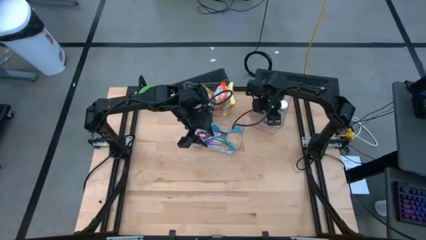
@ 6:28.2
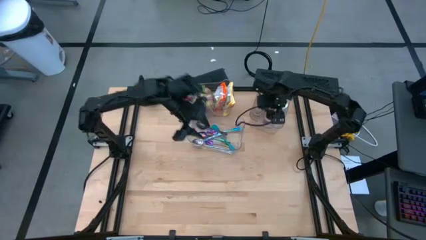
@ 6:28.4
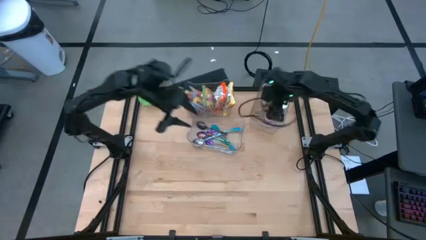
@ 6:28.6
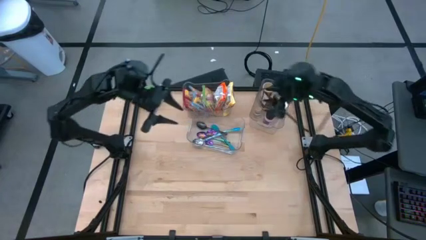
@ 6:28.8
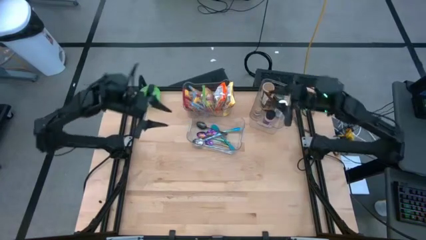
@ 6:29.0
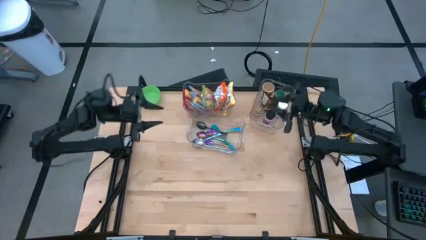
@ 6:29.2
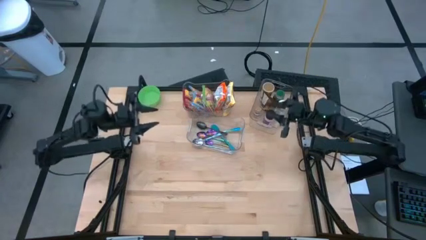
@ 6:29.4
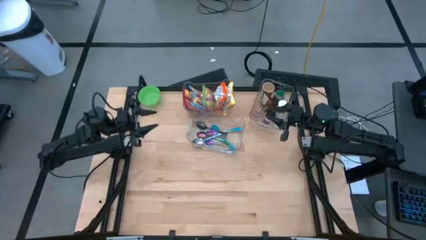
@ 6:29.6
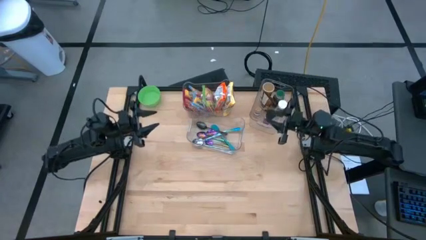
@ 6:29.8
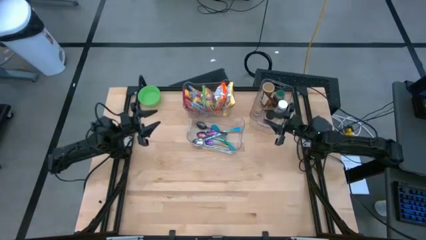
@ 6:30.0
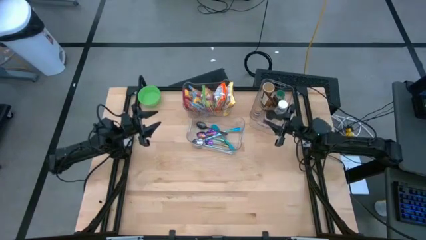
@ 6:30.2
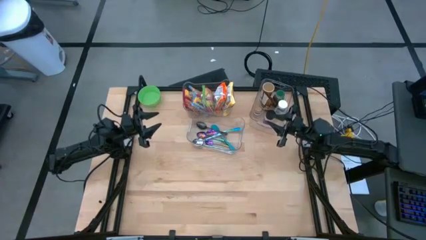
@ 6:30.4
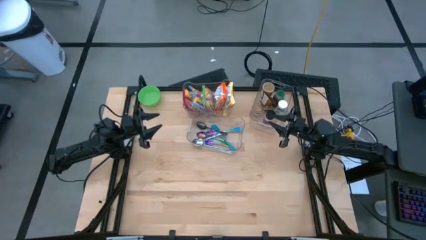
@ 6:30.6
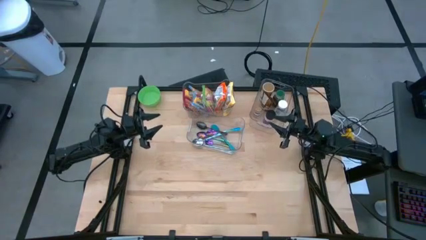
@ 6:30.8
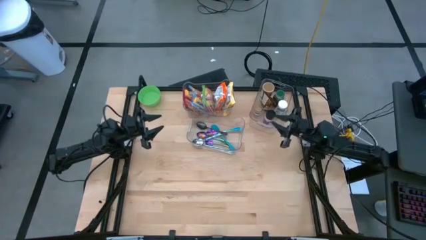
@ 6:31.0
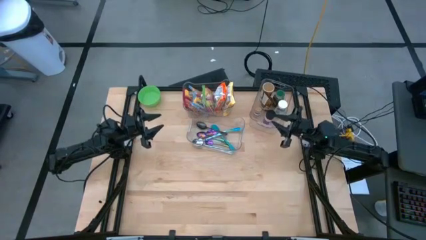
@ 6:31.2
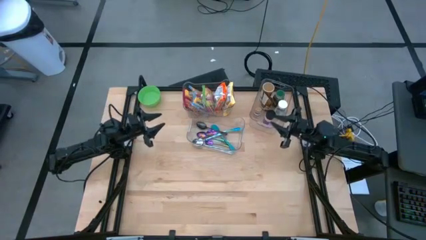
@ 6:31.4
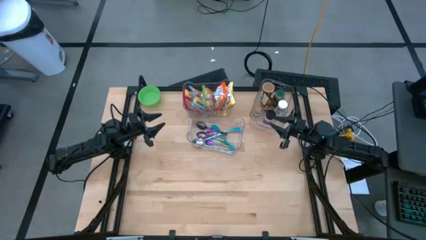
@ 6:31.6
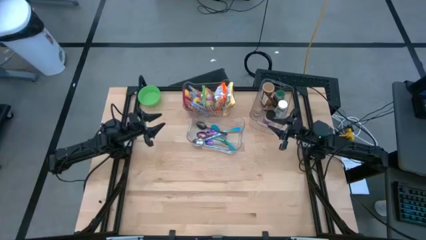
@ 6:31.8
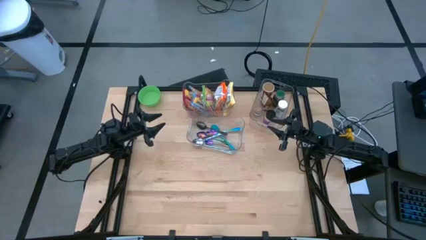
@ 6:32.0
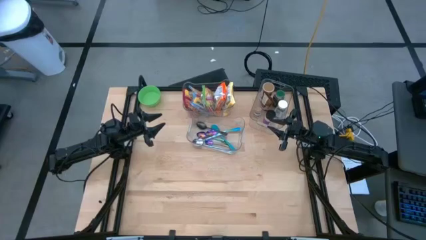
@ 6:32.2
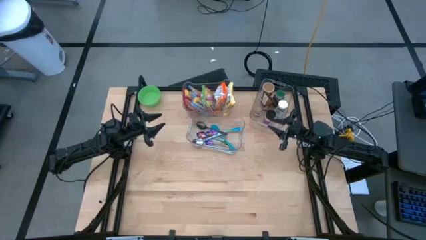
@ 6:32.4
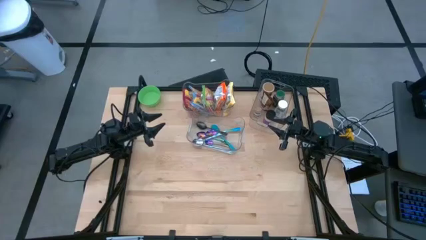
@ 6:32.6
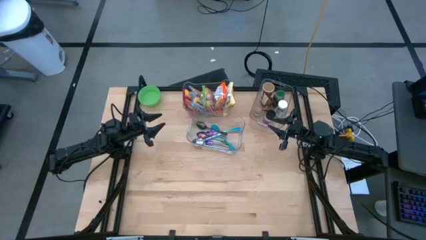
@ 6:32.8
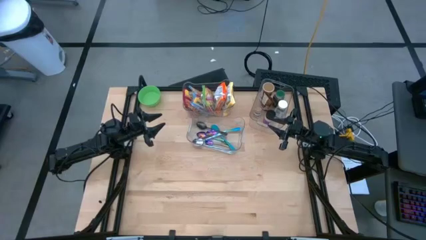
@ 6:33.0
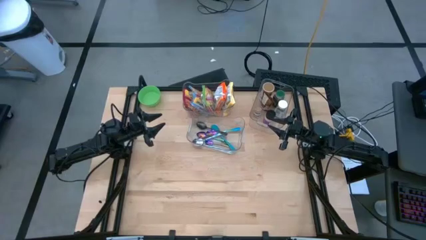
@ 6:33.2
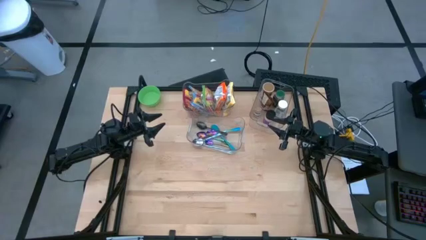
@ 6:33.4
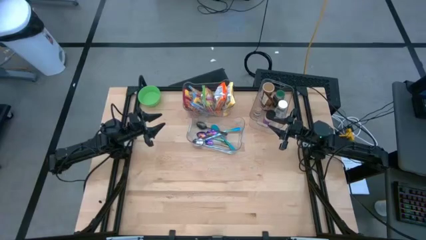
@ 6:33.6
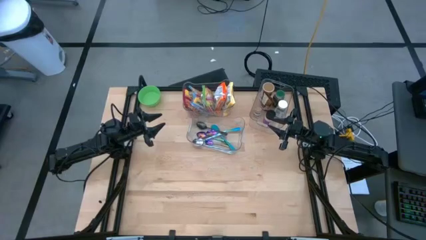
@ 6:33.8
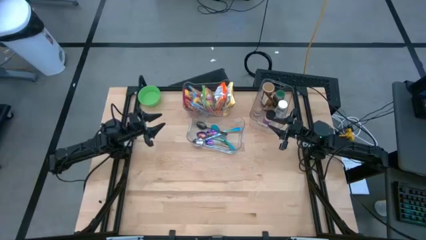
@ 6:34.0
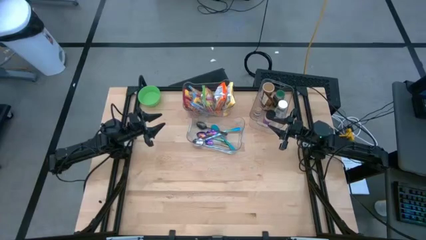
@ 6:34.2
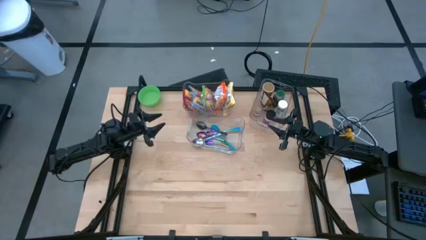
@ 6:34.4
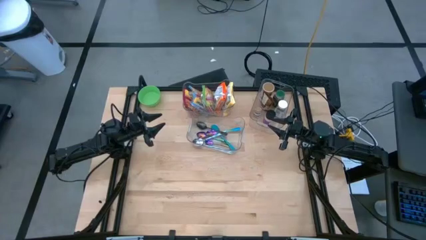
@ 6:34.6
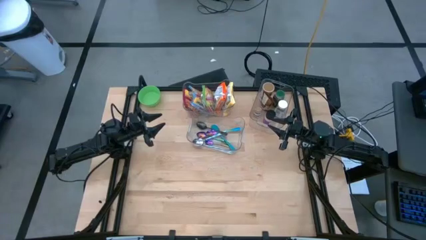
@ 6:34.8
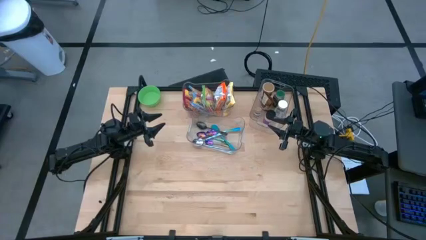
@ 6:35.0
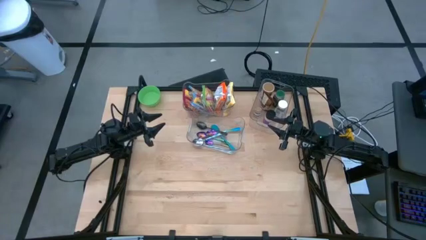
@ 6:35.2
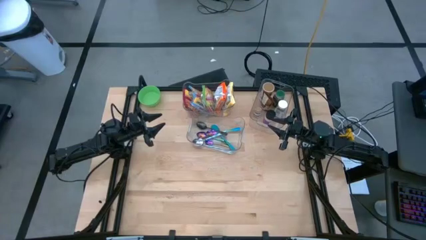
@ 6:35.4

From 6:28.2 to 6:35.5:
Task: Pick & Place Food Item
Return to Home Position

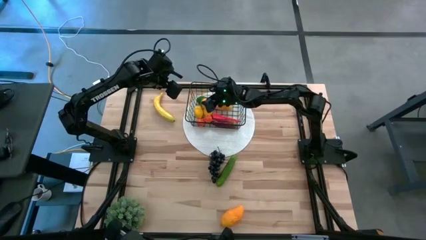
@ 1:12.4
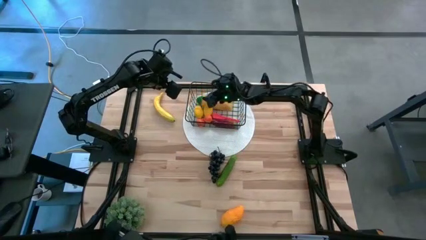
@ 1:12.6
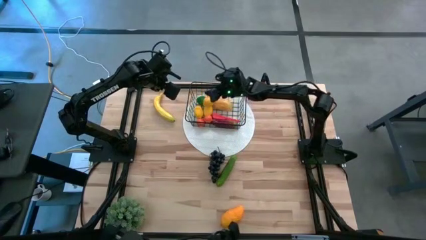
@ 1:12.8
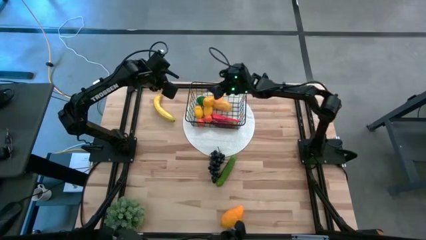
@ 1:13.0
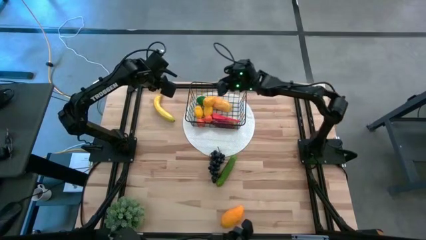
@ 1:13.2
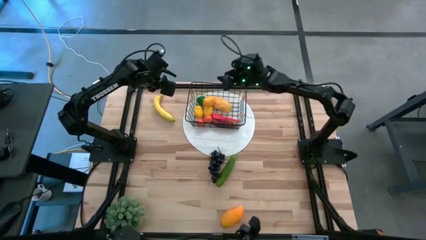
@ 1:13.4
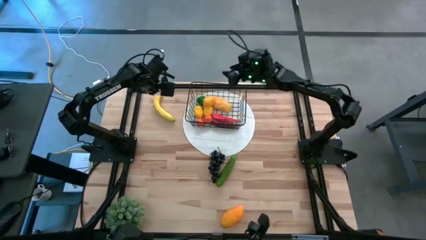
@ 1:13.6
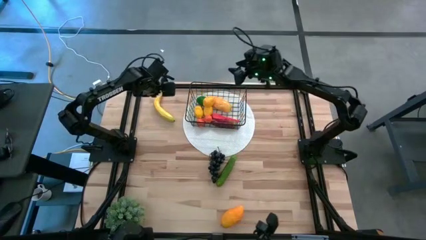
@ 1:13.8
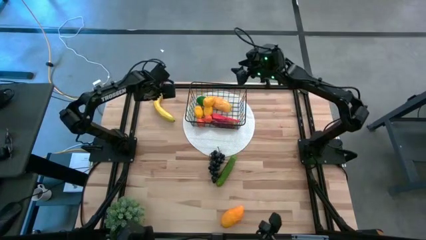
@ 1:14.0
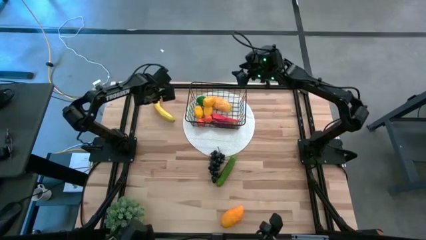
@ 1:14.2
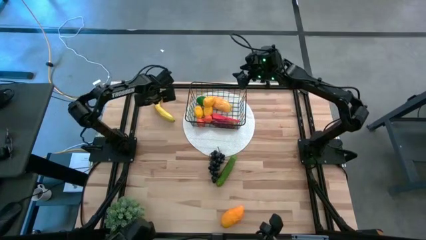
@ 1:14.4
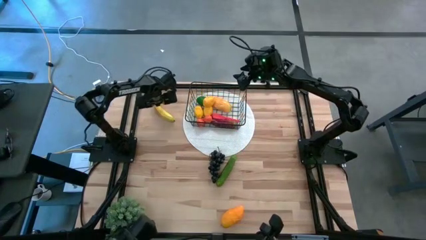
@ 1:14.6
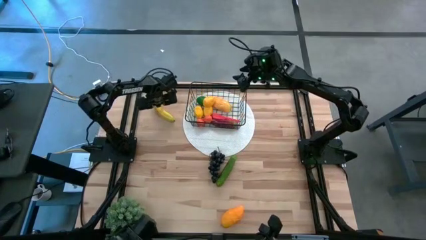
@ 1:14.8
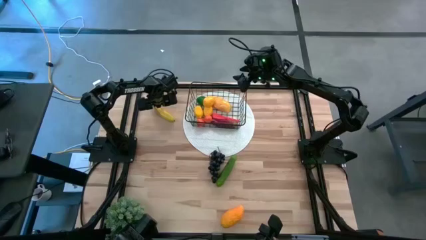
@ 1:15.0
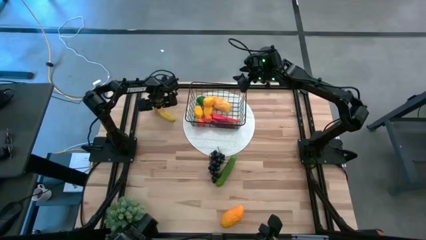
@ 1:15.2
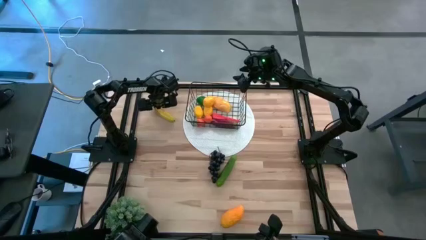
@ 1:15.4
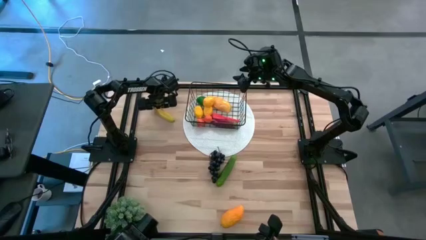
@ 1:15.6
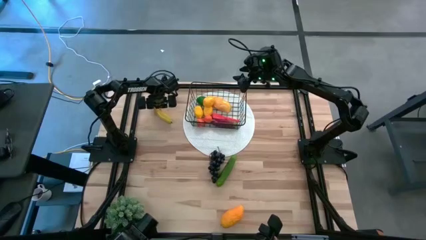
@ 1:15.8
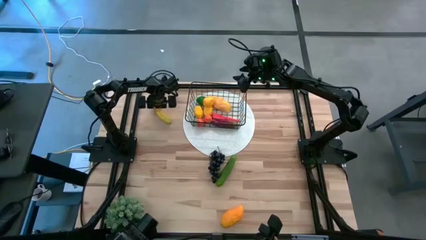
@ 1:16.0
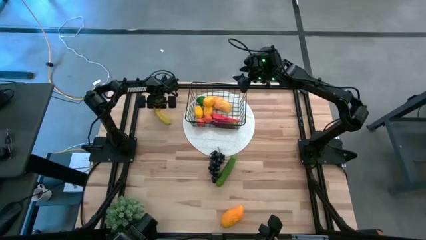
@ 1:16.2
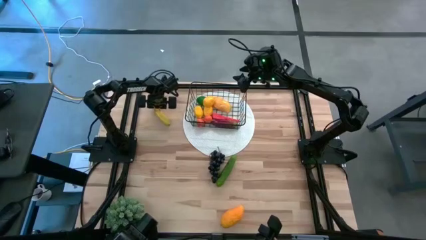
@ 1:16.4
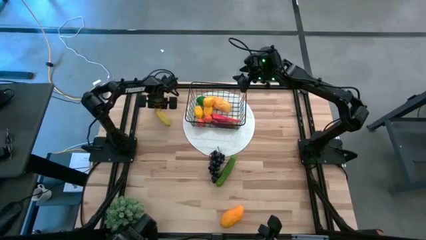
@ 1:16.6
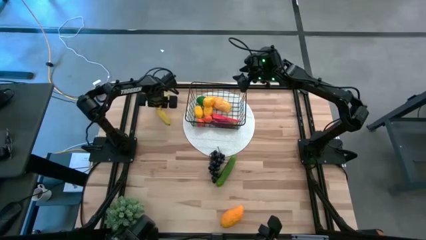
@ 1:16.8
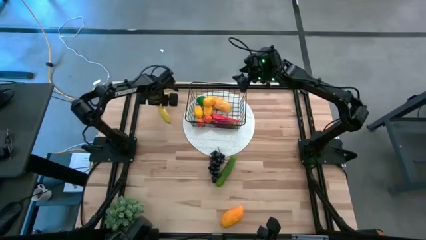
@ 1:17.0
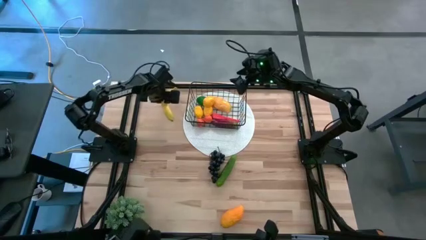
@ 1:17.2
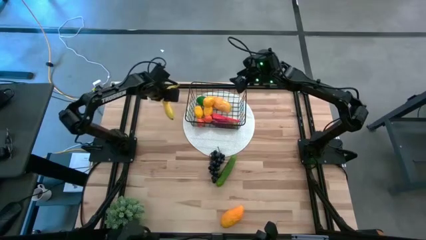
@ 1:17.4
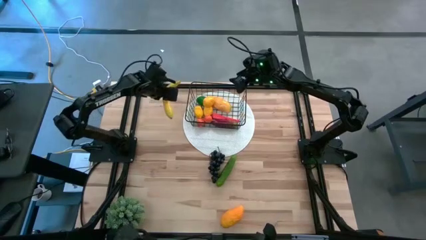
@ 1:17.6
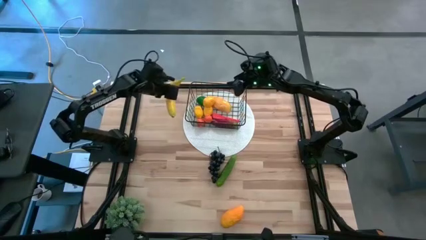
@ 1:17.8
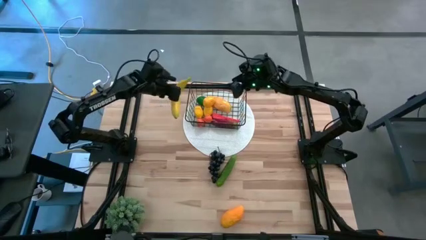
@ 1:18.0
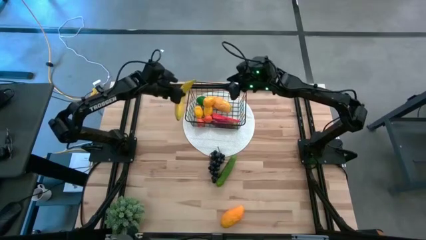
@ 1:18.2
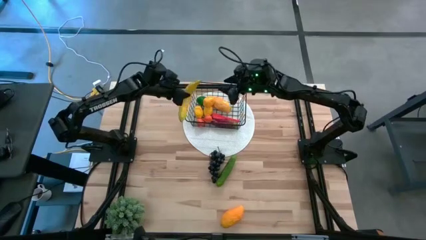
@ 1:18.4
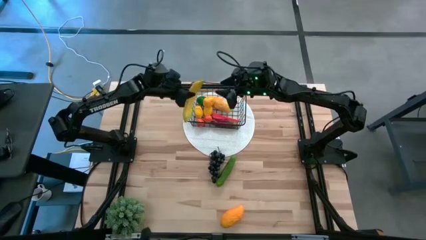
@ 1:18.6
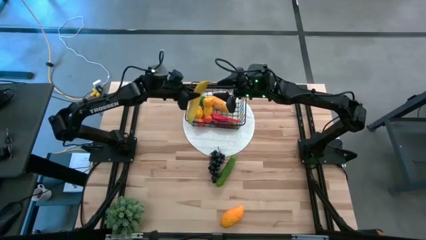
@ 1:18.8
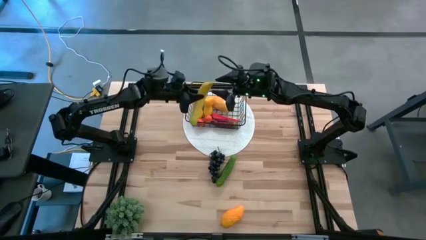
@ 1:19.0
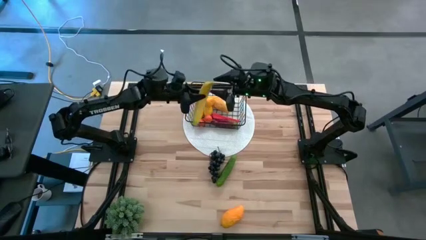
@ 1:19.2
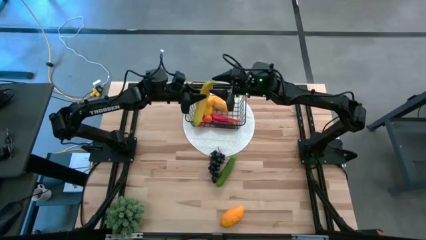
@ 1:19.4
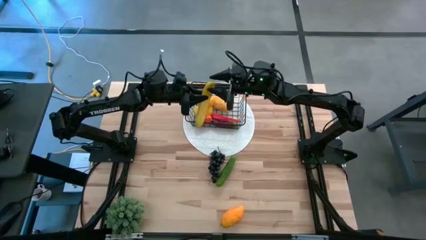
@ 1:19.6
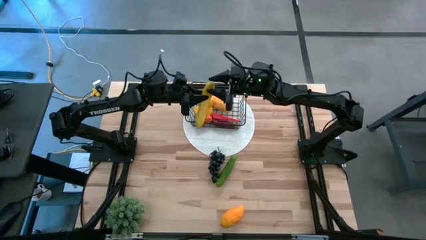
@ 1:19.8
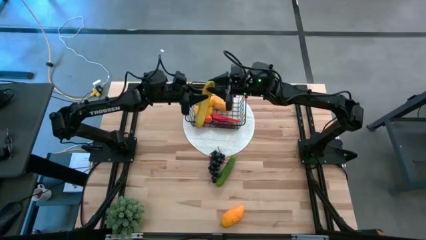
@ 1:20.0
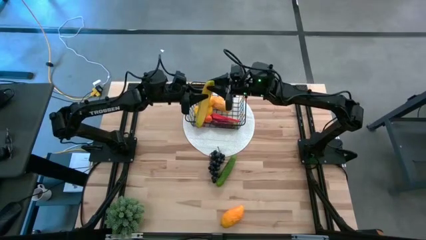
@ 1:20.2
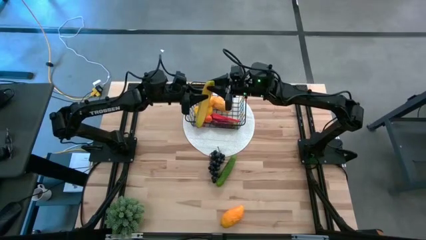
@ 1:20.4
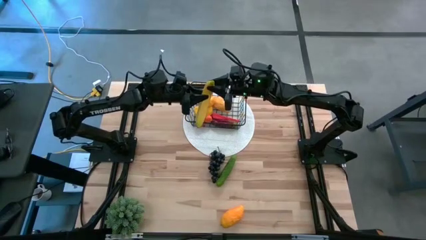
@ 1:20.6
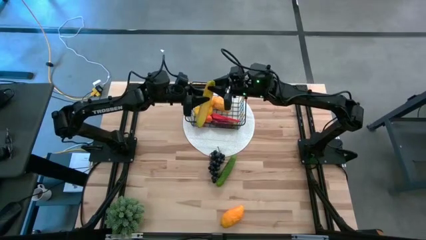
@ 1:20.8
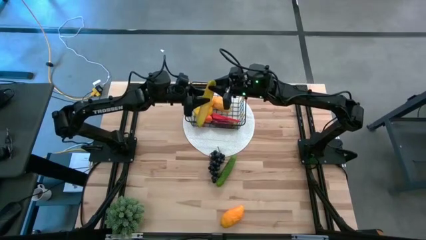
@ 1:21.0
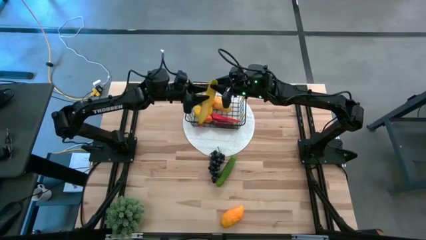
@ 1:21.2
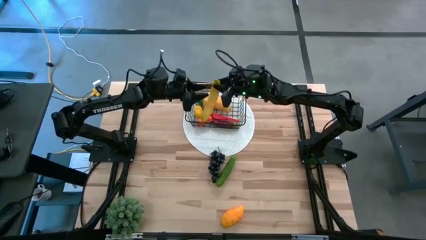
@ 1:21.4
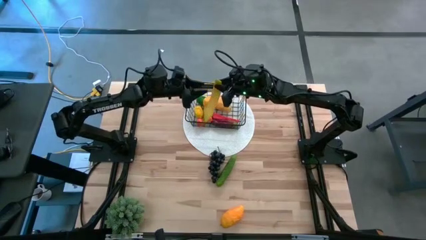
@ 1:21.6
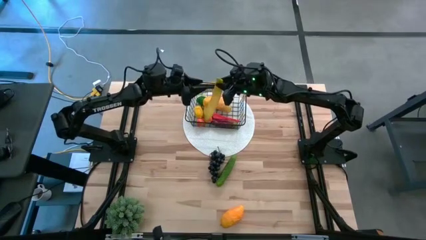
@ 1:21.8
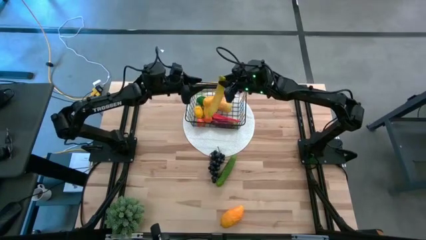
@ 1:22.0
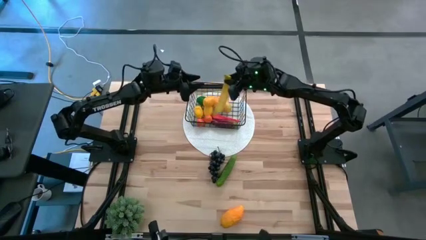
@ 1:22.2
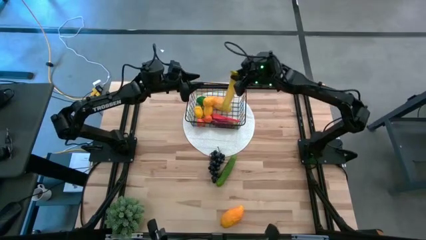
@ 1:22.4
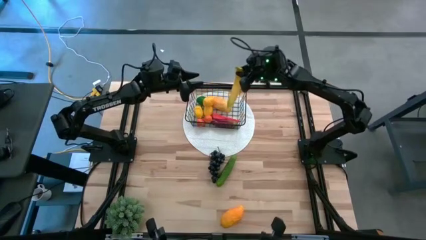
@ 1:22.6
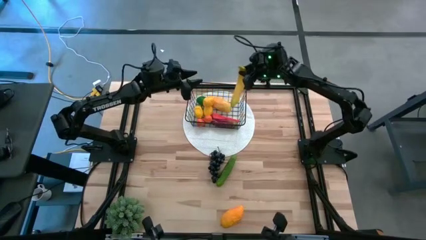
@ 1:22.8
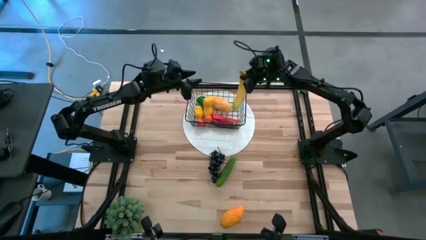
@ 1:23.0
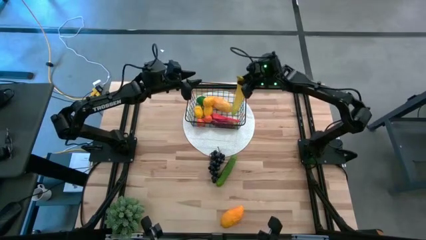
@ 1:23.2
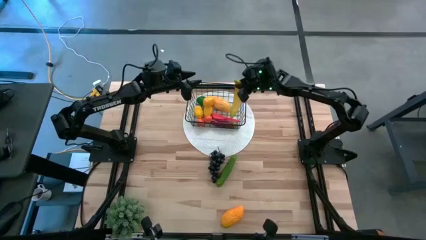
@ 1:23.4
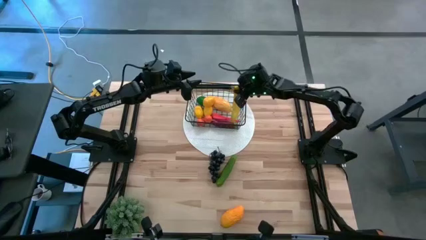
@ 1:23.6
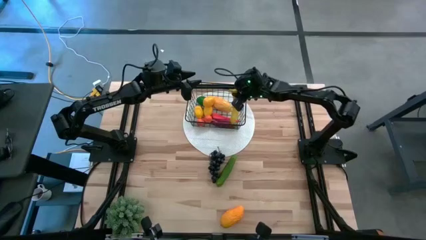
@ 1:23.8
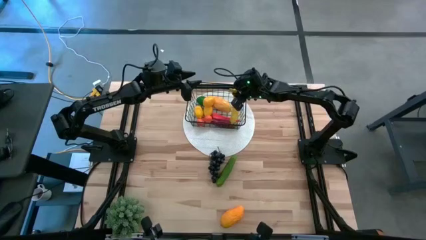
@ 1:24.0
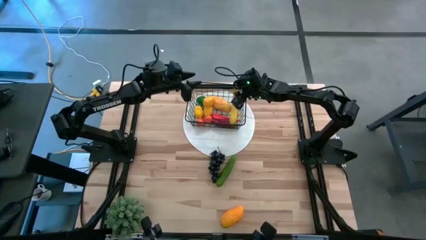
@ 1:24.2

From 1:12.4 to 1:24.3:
Task: Build produce basket
Put the yellow banana into the black wire basket
